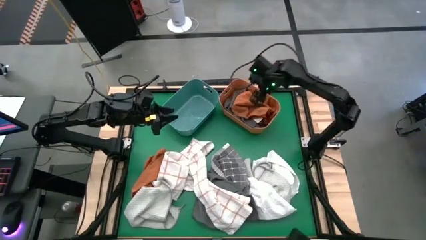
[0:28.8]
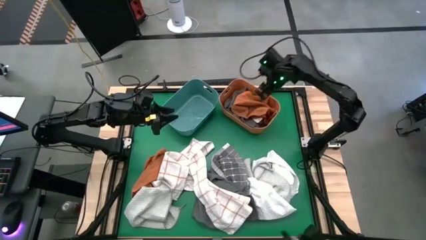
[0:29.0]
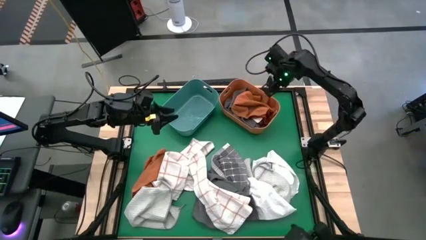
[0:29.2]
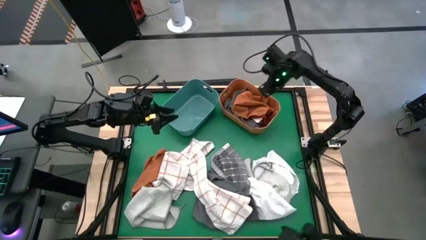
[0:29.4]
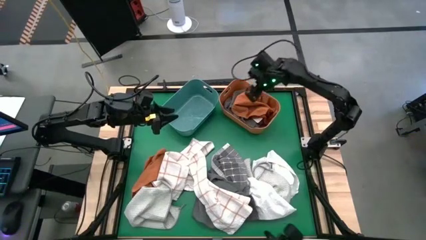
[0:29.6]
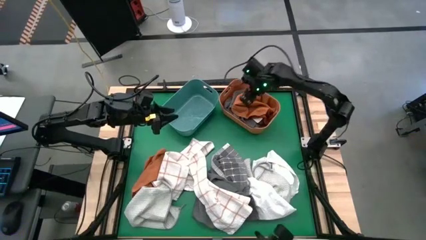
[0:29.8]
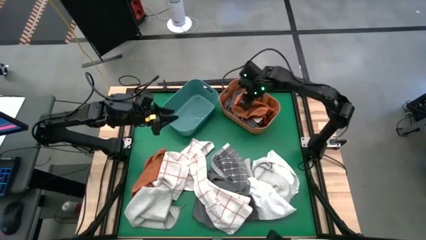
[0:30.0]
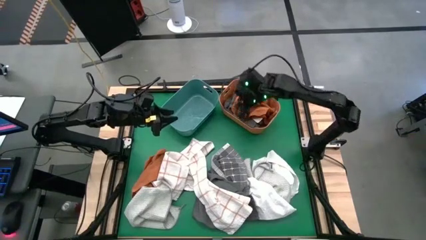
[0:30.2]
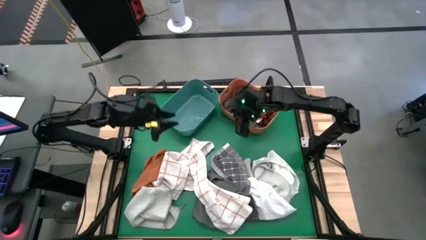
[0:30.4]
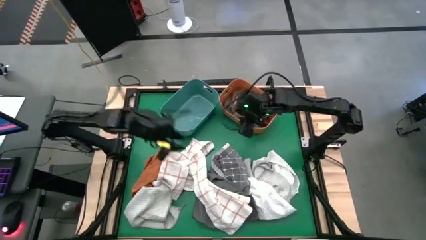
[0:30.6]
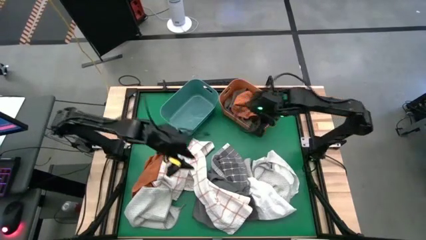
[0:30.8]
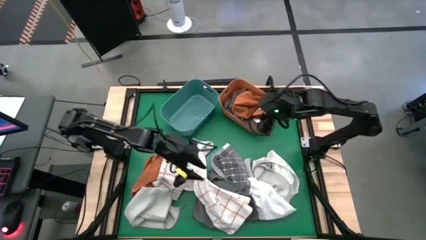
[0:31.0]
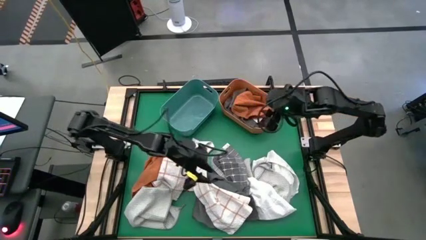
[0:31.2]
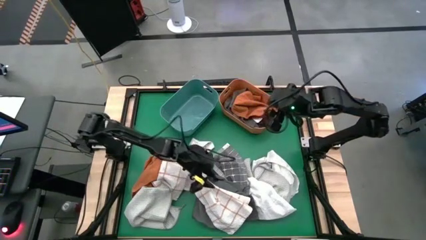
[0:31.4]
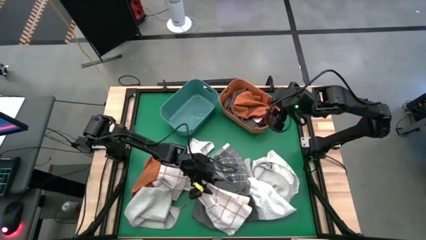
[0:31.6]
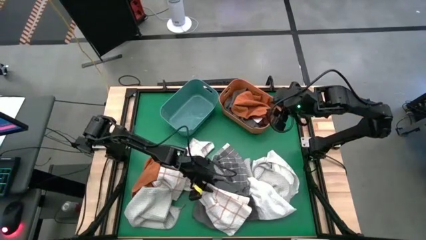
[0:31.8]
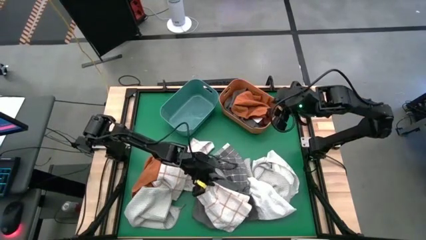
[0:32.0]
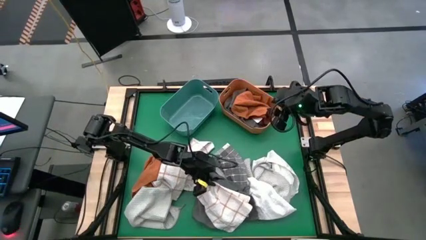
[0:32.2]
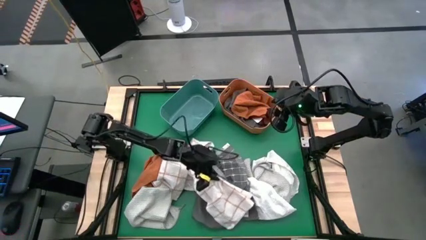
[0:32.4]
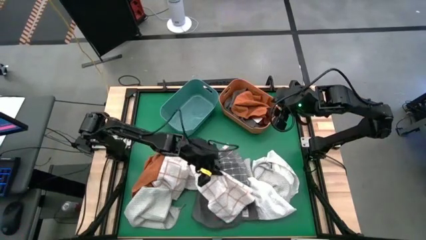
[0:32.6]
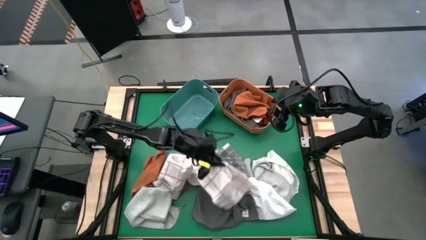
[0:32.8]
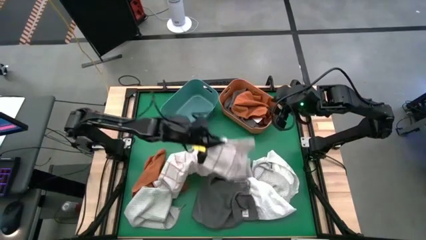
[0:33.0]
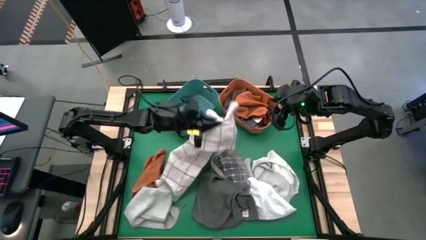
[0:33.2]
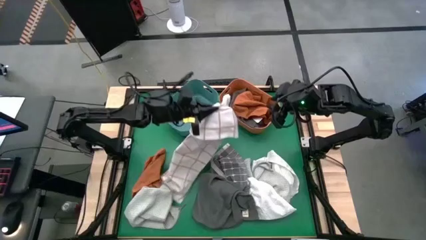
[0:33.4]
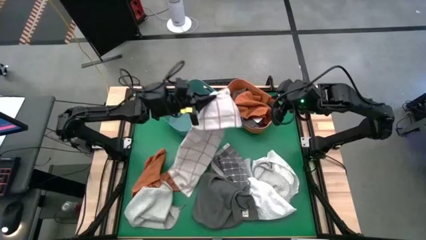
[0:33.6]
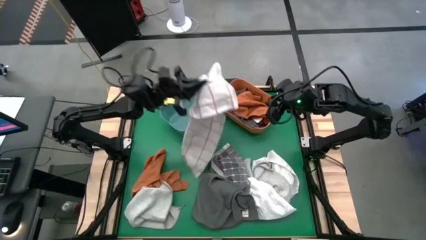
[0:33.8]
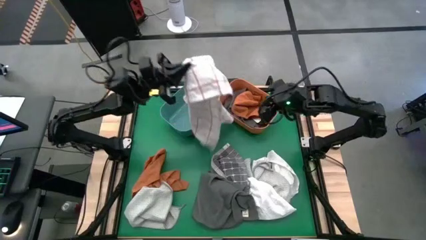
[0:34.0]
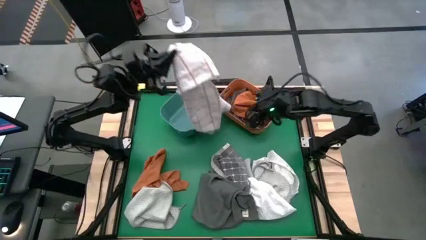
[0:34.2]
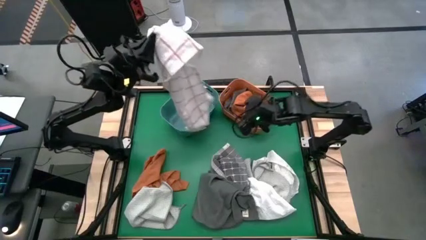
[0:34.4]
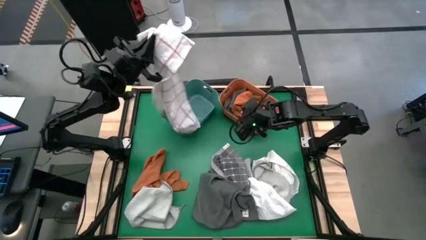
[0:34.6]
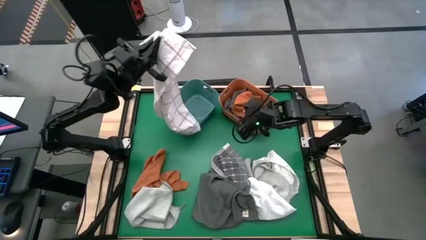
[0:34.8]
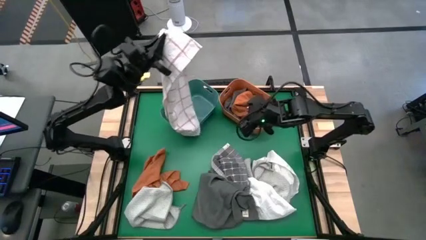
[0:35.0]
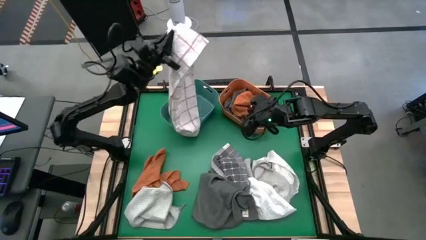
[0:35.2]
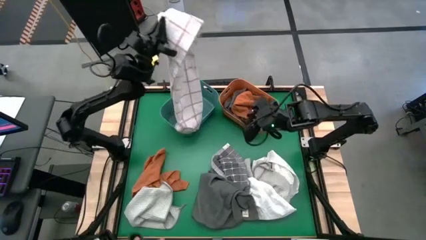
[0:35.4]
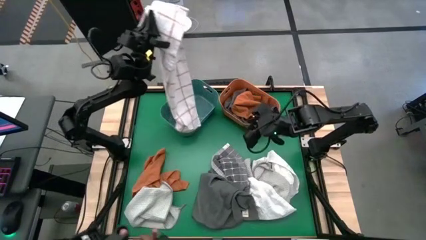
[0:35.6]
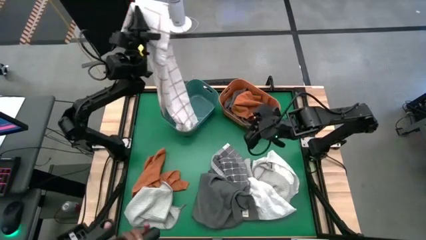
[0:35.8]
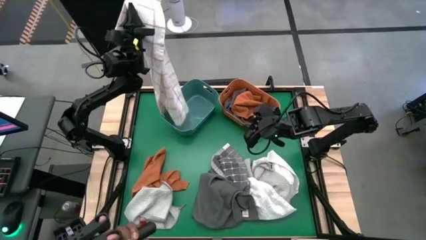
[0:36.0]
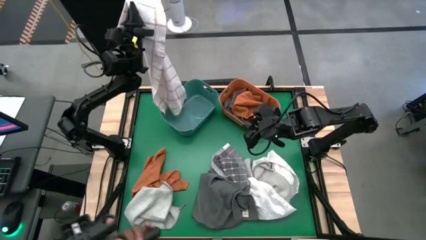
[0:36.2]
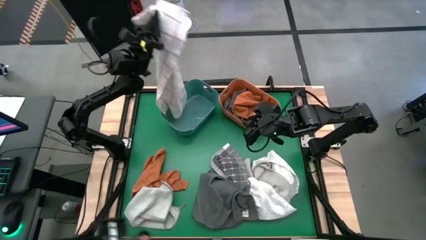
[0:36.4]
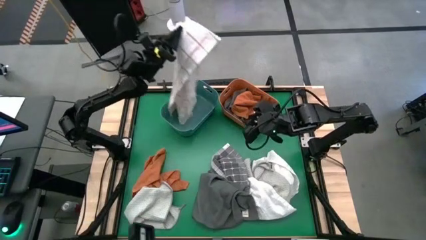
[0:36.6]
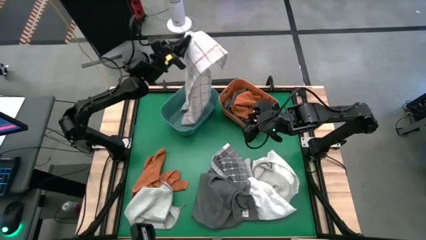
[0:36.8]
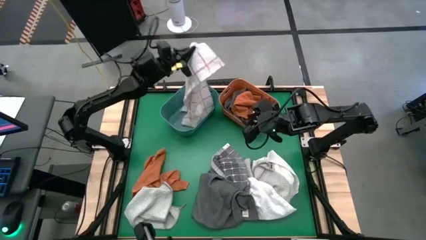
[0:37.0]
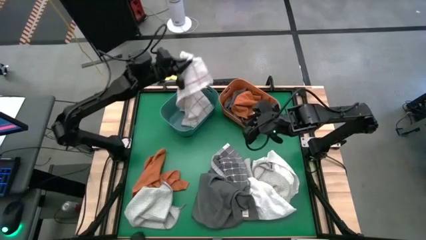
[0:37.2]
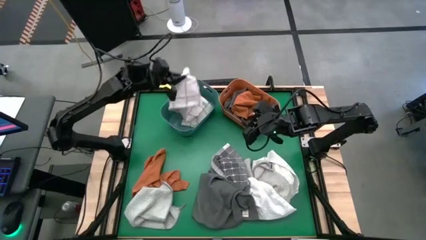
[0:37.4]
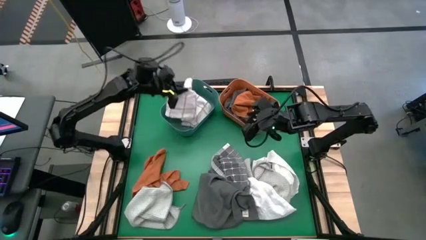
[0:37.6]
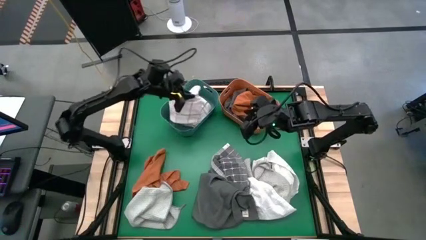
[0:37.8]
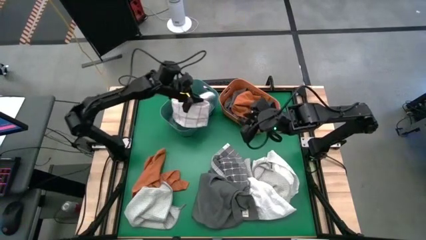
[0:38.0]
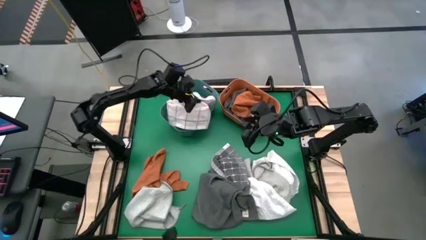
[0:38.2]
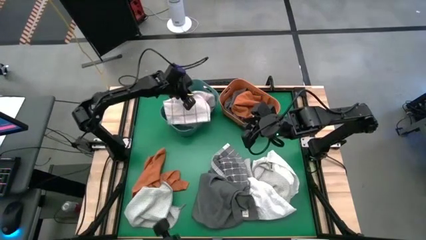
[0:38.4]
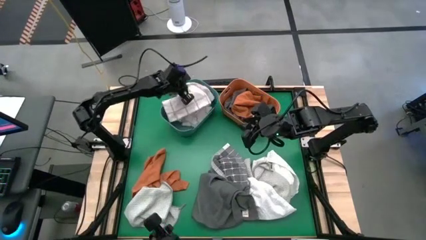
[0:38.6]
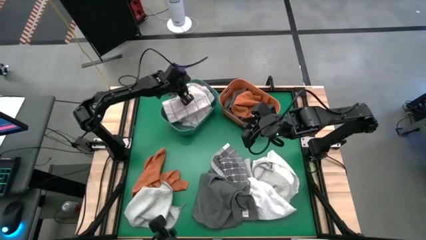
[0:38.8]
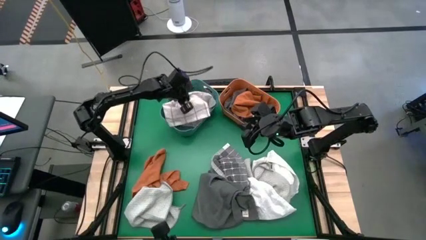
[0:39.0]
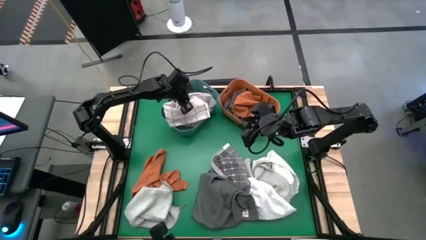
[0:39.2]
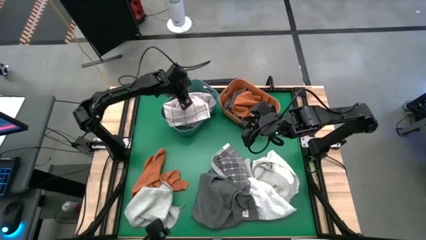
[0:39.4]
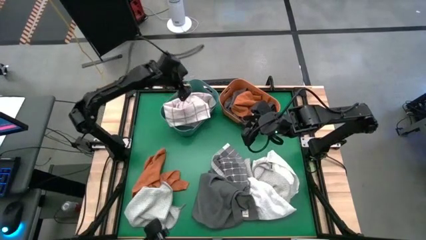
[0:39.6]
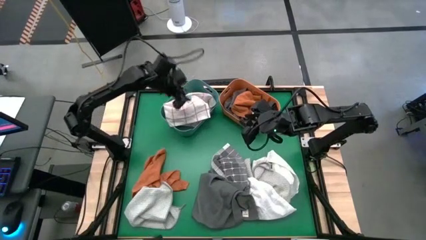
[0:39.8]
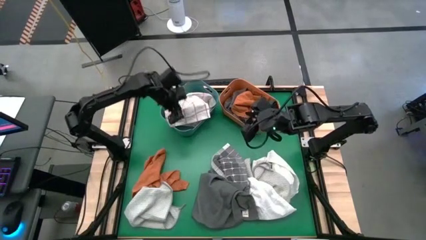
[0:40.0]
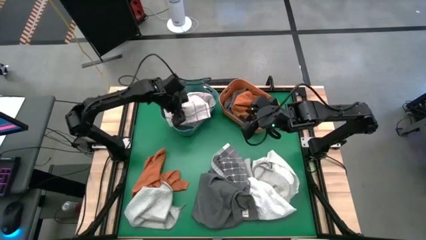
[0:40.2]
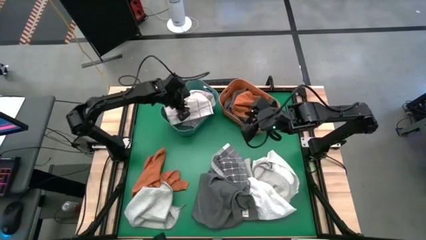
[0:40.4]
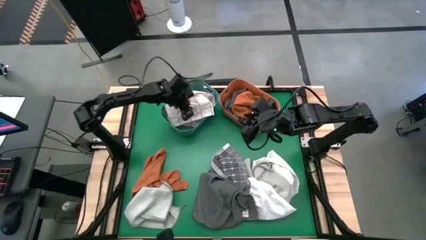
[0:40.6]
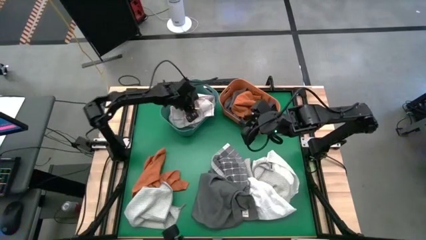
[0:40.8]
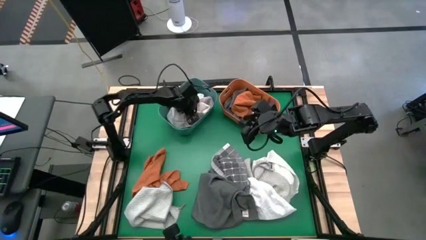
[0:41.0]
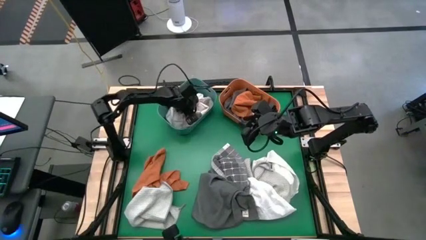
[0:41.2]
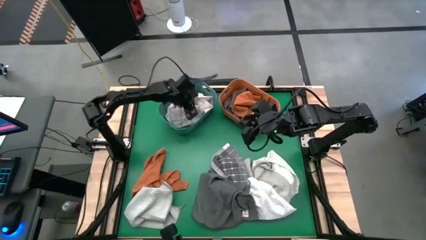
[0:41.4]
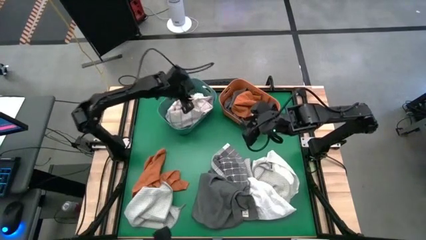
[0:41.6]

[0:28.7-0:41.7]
Task: Sort towels by color in basket
Put the white patterned towel into the blue bin
